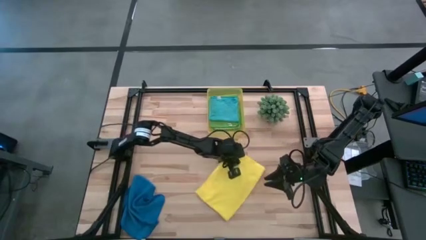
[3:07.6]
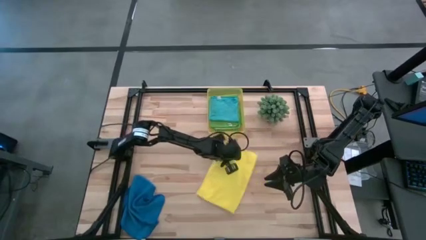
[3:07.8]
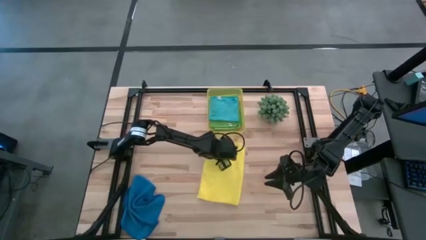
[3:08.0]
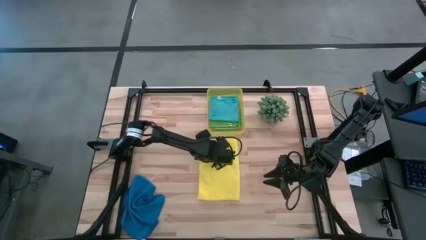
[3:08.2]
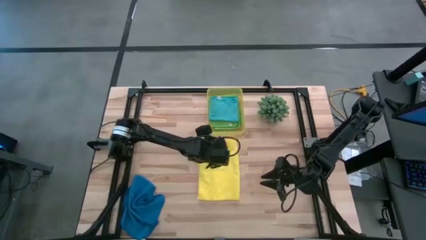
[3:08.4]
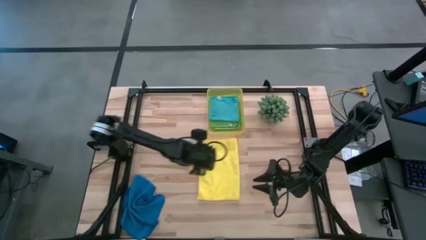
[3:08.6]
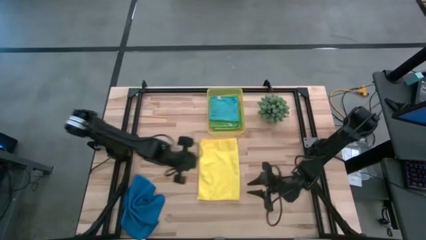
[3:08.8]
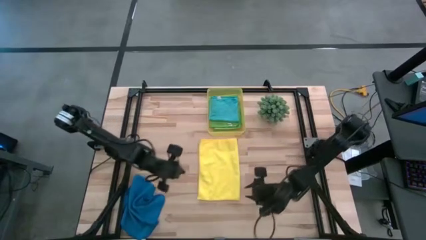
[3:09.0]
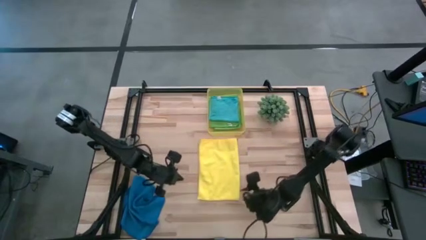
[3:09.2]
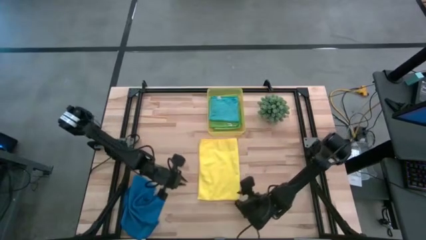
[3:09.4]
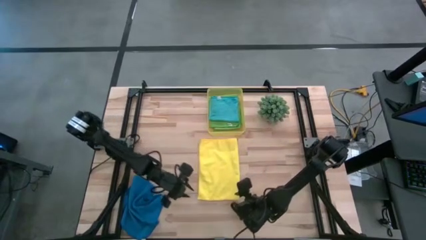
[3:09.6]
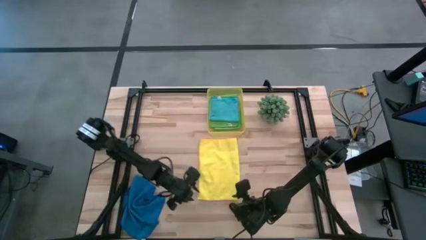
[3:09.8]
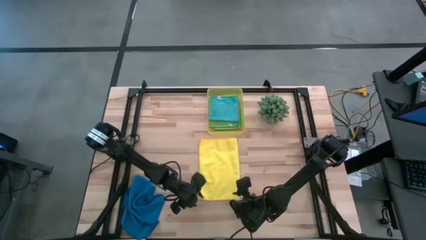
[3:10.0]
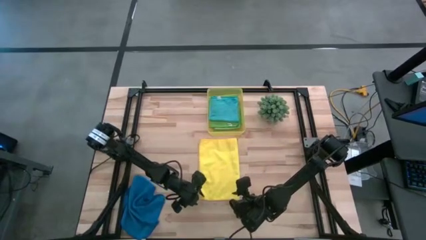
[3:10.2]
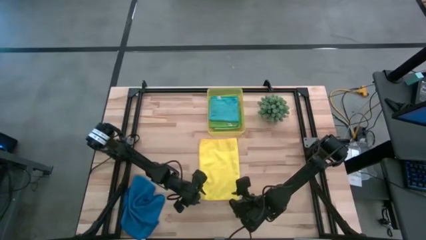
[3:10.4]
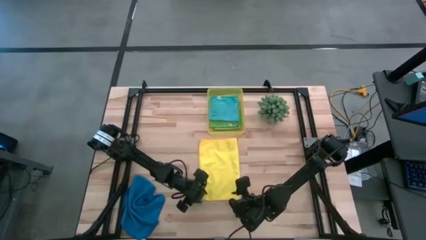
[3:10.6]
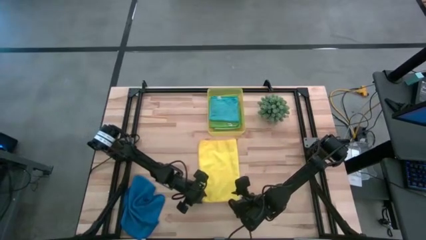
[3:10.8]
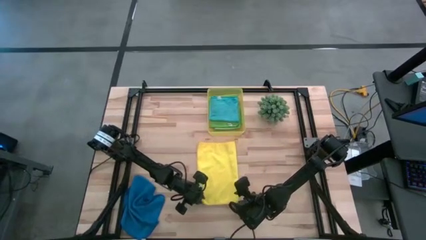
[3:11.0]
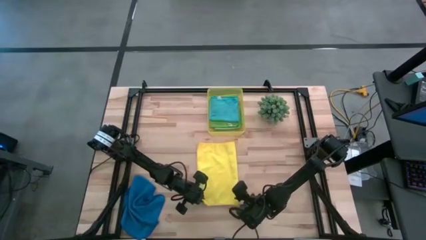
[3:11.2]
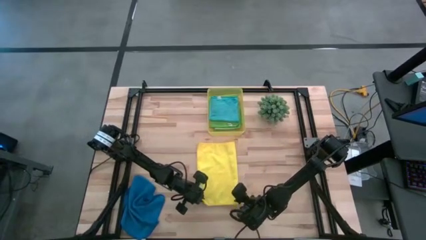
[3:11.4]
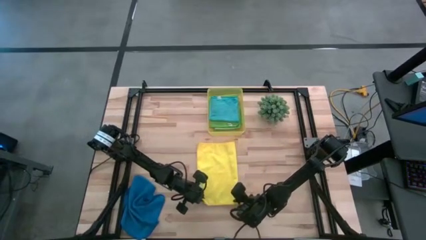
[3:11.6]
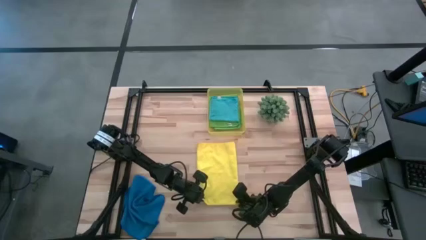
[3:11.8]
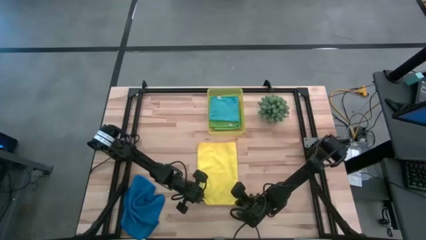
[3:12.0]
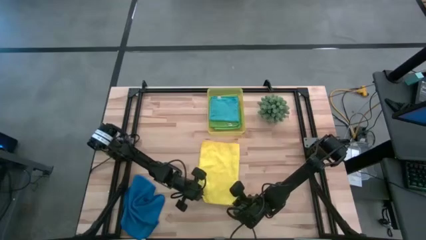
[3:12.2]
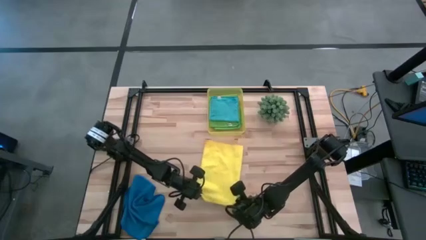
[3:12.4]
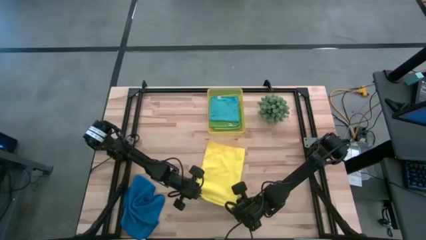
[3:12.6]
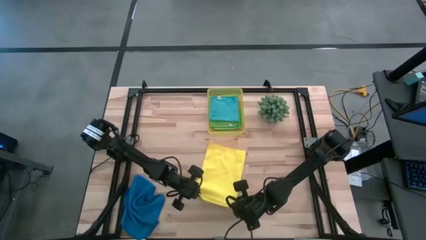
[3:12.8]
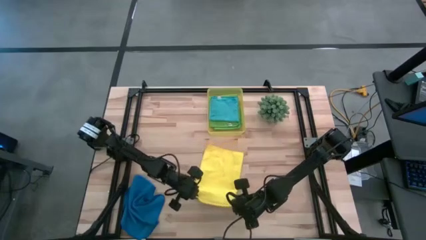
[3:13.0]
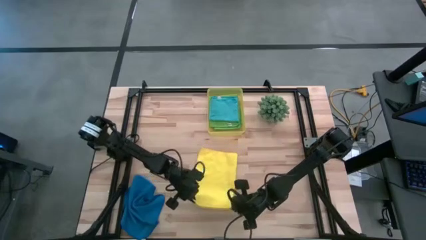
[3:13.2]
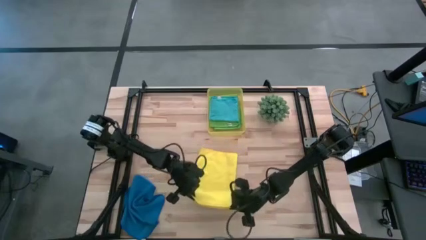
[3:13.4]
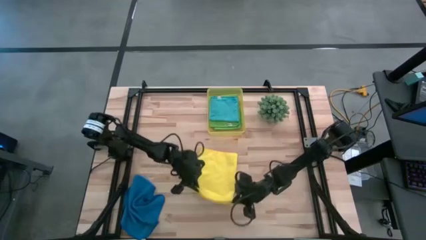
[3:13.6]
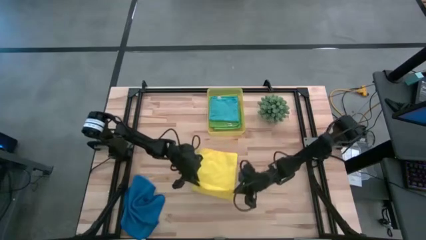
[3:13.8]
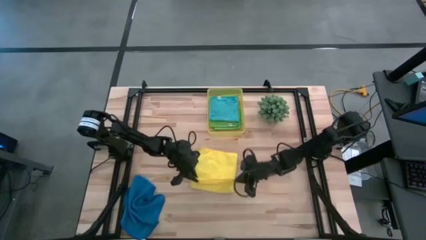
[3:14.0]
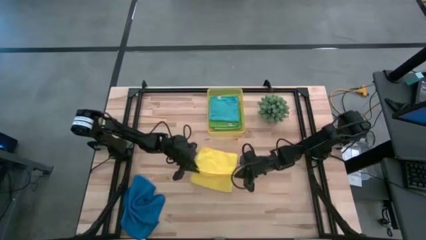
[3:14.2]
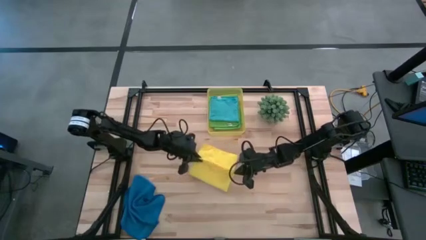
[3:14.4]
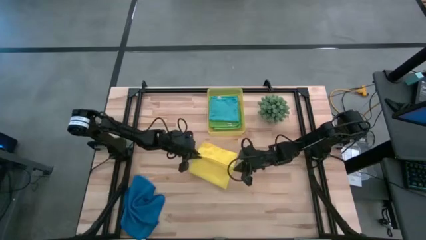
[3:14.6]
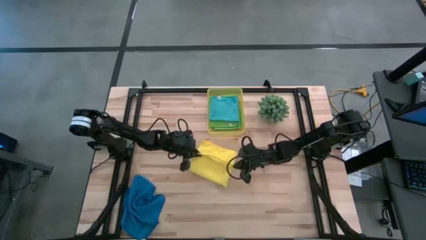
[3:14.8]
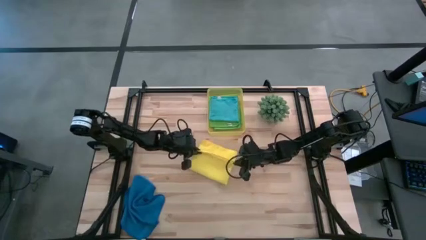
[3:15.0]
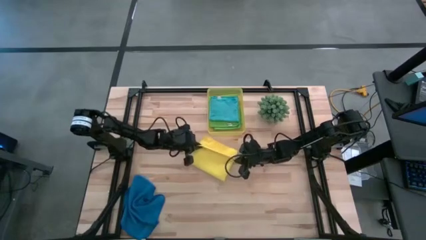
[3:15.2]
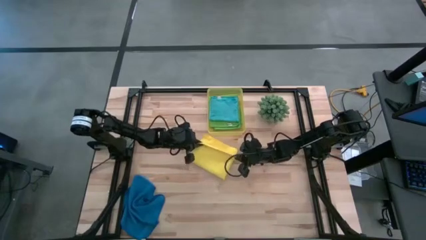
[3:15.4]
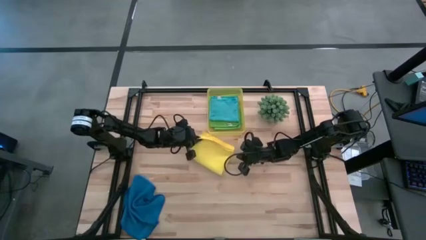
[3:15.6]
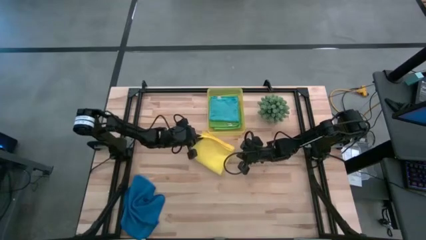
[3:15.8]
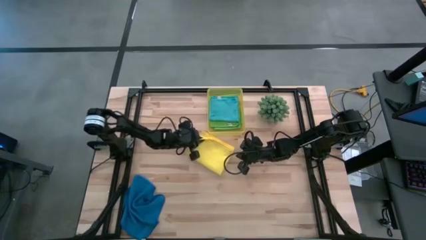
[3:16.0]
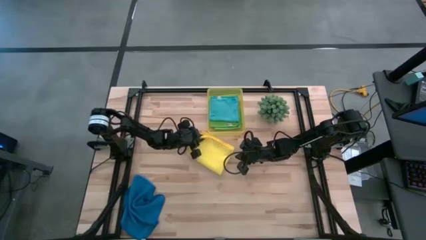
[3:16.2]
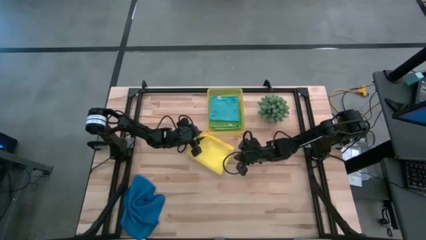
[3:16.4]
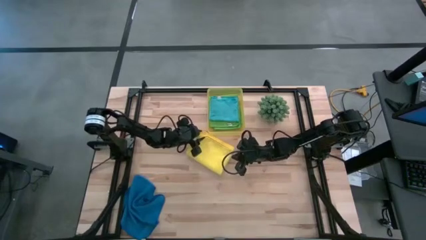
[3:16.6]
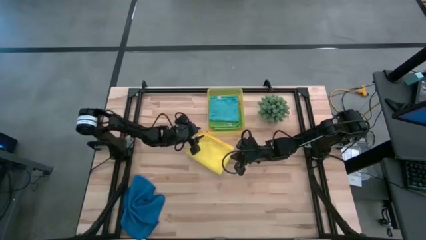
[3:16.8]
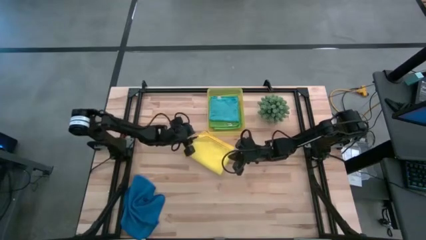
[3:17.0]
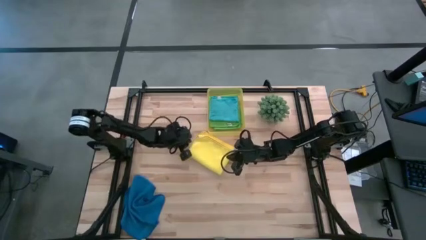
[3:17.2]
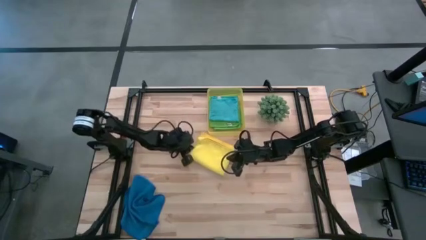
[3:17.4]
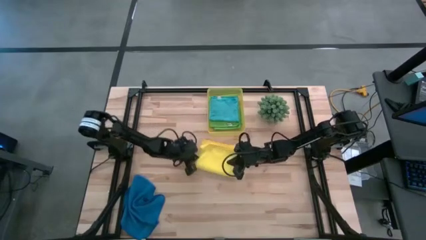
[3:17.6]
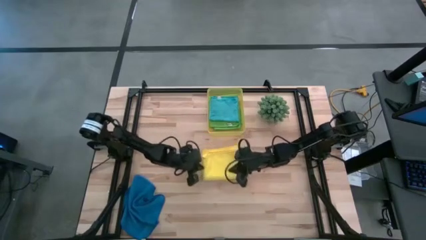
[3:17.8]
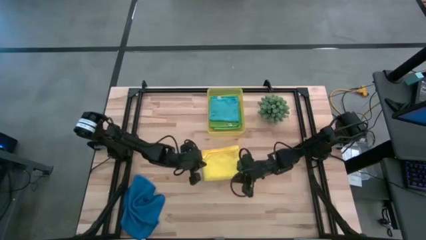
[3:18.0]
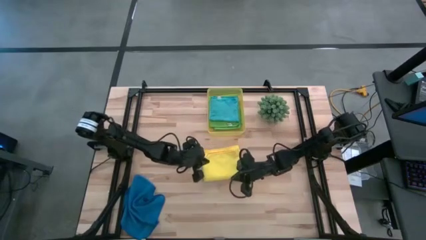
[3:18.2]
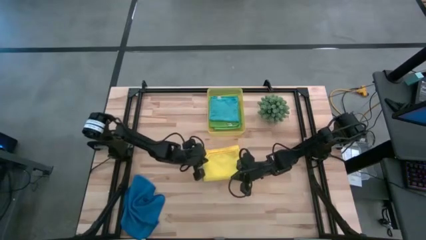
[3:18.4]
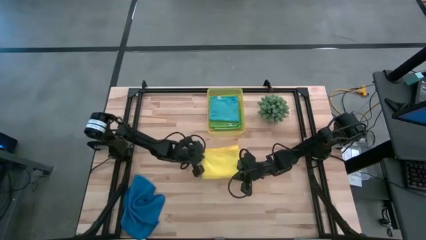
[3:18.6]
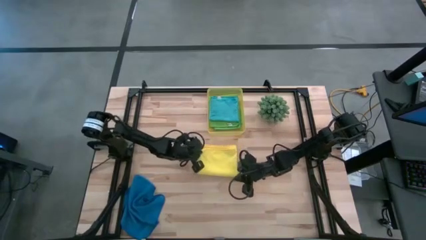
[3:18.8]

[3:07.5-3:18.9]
Task: Fold microfiber towels
Fold the yellow microfiber cloth

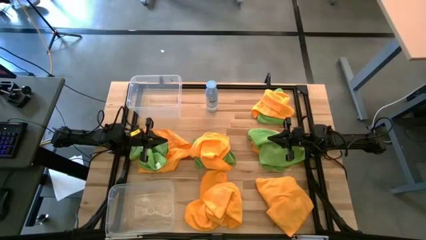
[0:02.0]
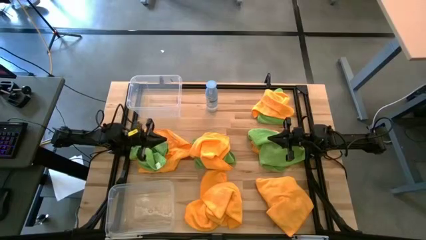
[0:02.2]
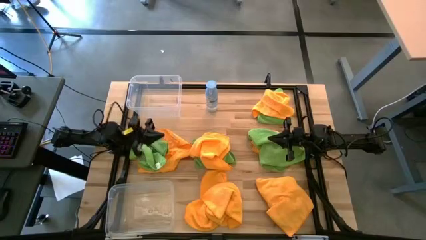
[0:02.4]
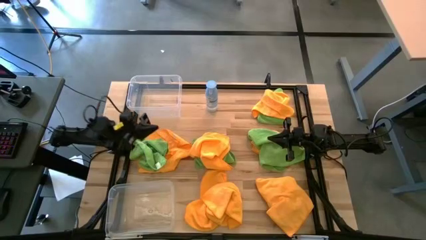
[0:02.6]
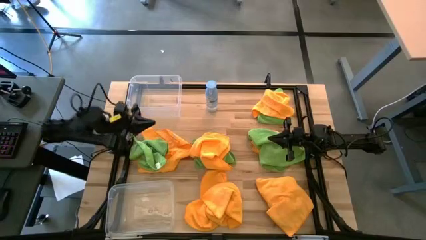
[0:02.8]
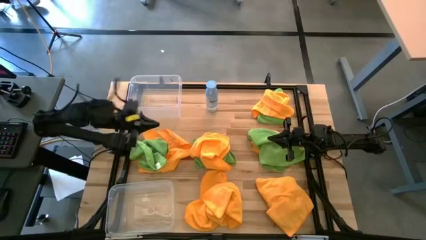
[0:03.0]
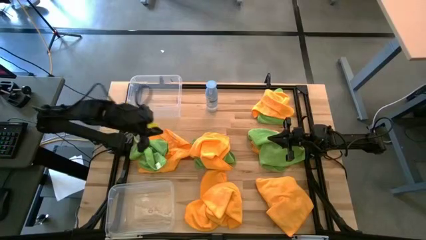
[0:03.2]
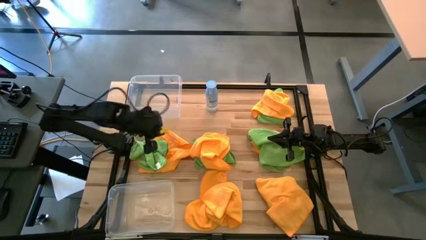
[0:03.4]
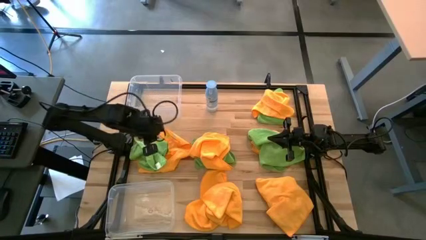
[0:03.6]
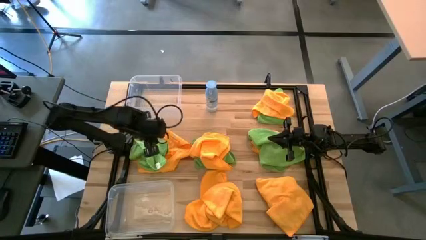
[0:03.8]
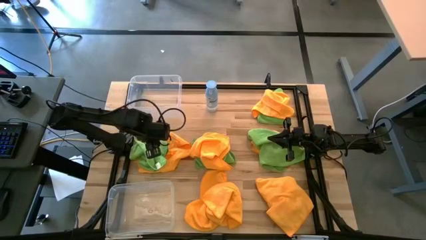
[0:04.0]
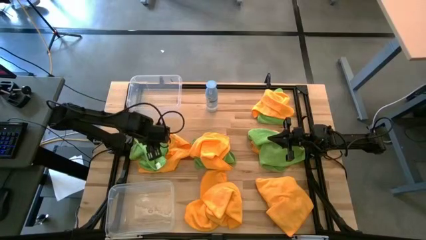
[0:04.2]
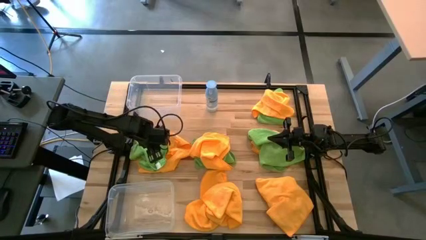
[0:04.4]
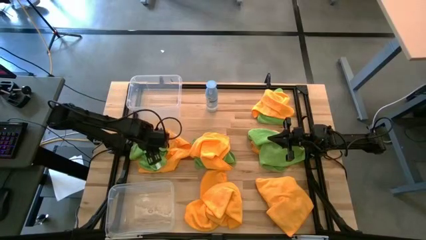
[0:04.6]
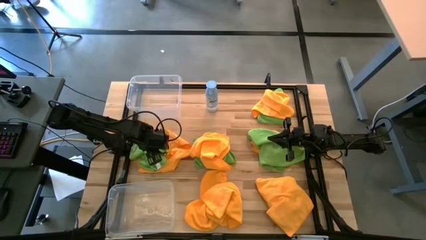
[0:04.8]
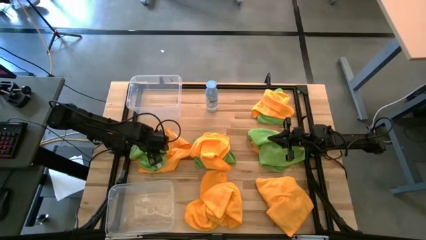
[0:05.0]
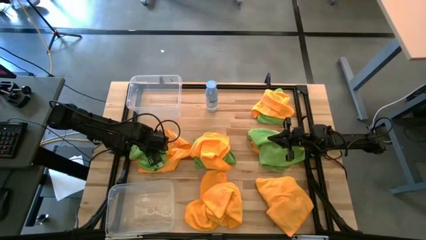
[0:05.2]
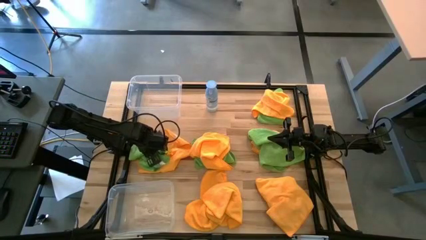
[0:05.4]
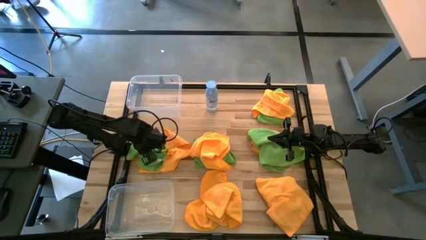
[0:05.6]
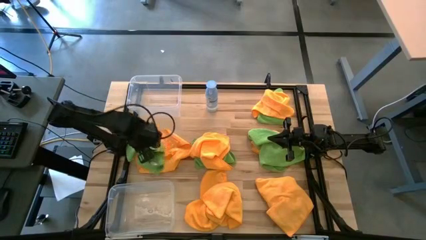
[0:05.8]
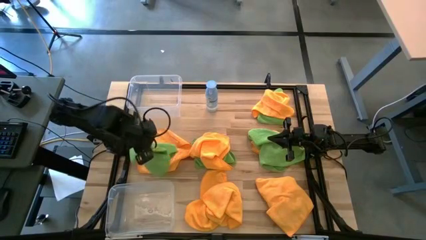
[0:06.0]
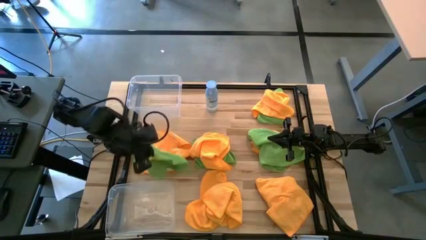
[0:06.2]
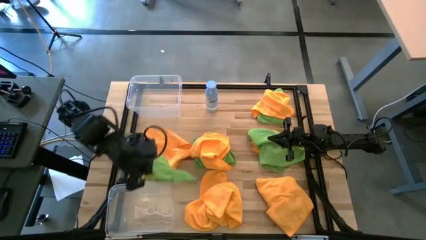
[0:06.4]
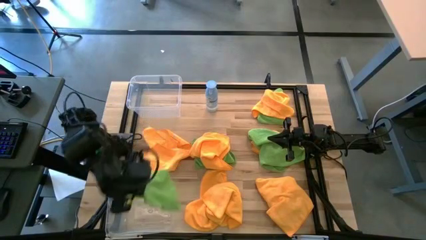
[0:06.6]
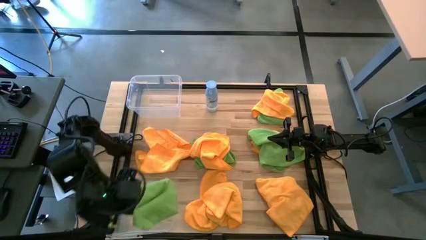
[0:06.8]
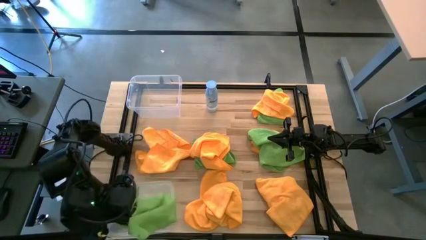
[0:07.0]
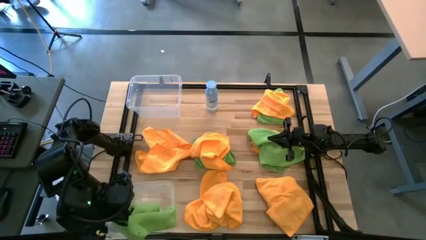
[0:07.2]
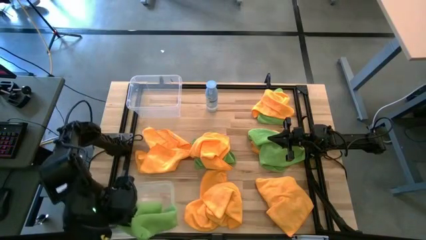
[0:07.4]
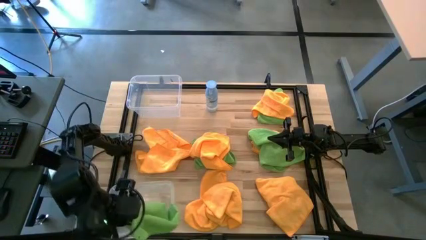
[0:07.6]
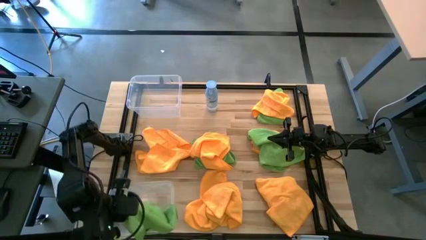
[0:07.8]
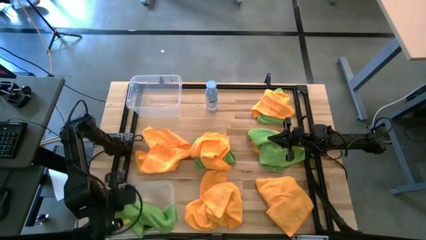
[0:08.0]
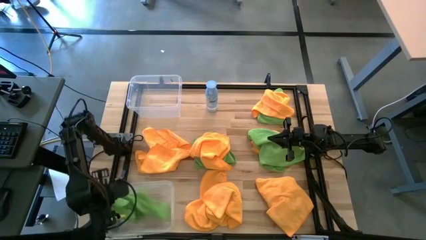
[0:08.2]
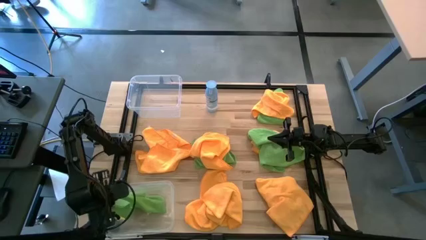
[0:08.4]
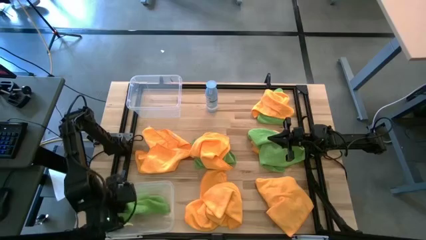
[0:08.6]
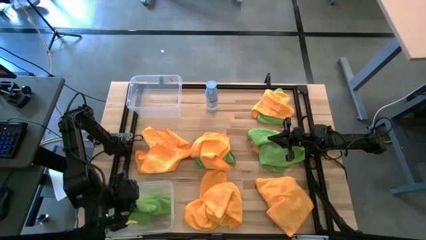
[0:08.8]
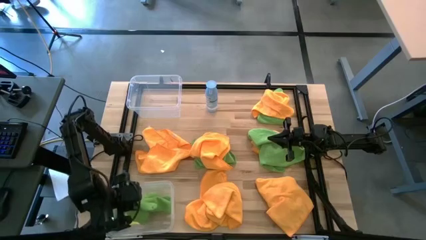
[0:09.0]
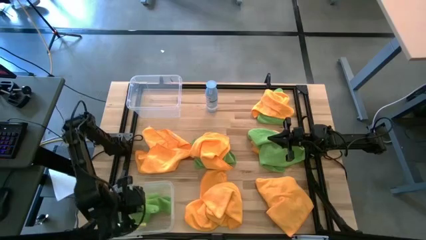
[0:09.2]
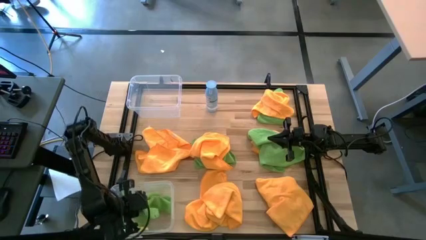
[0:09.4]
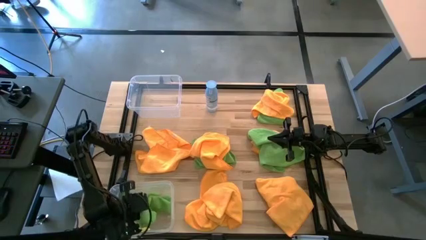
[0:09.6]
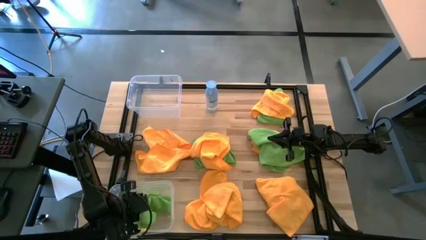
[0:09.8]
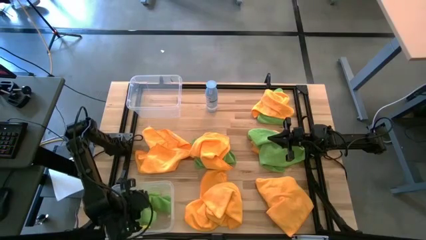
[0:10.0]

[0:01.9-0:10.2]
Task: Sort microfiber towel by color & place in baskets
Put the green microfiber towel into the bottom transparent bin
